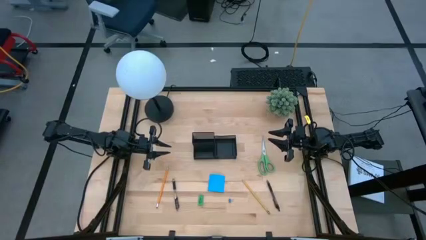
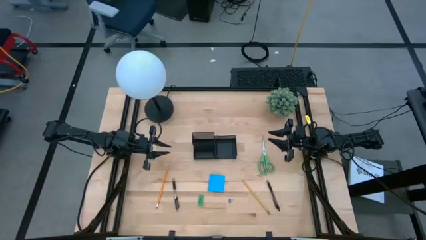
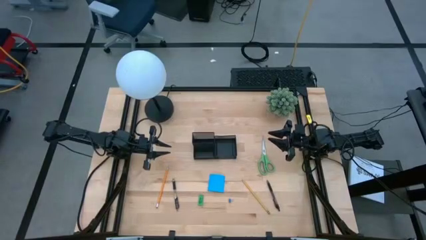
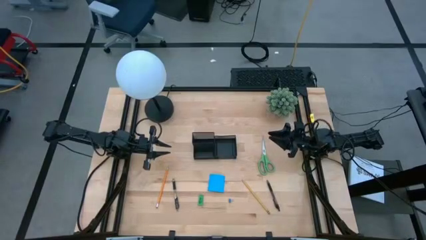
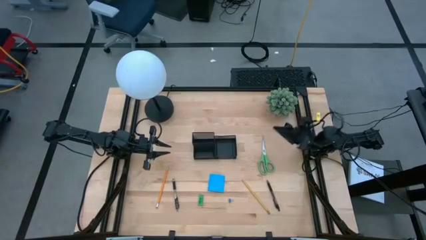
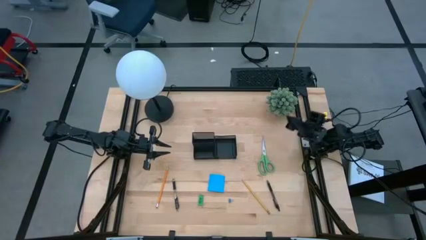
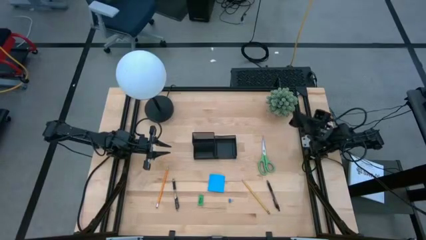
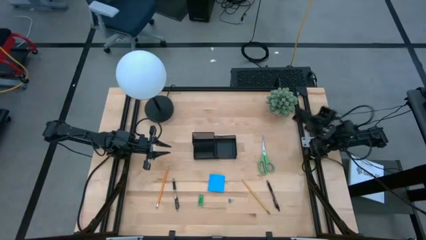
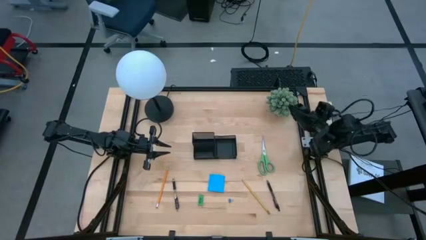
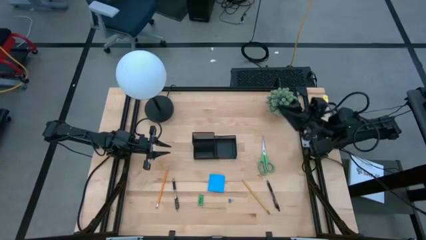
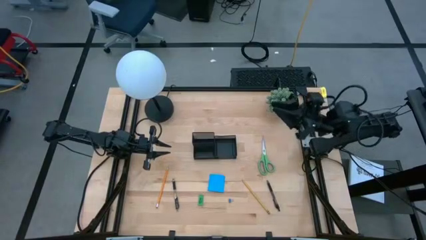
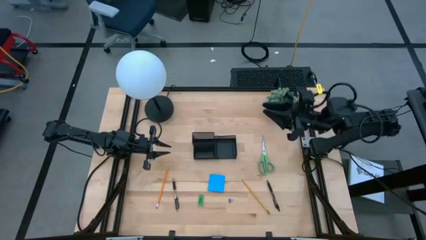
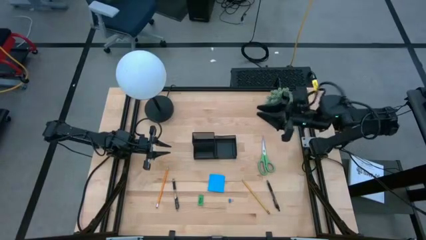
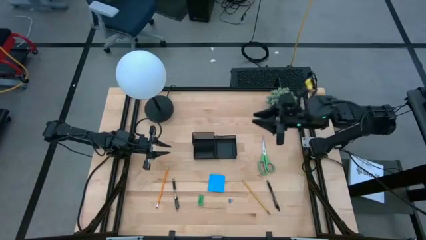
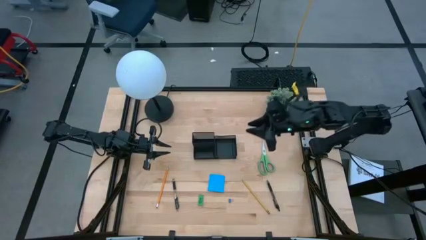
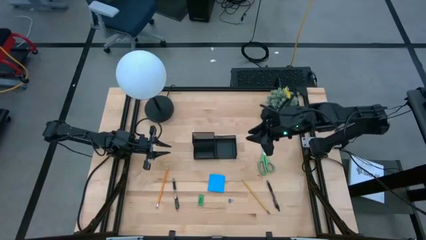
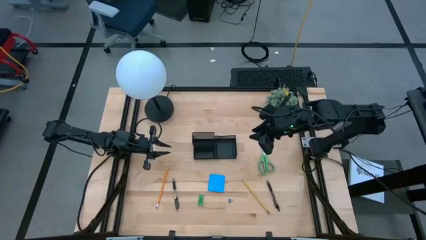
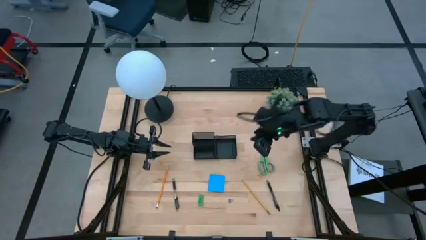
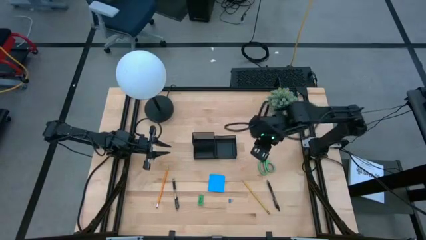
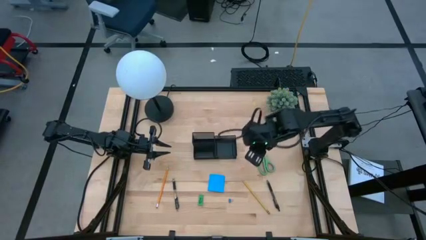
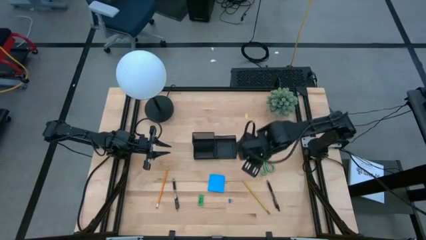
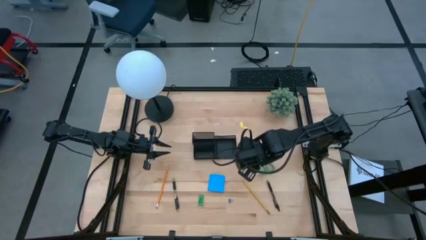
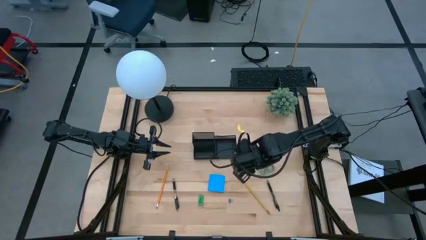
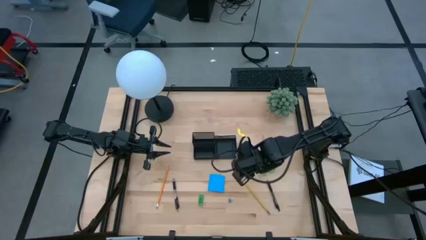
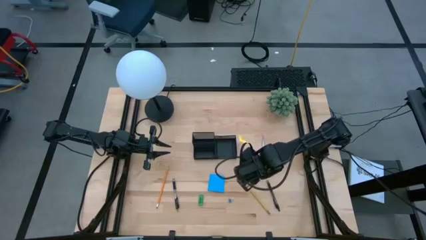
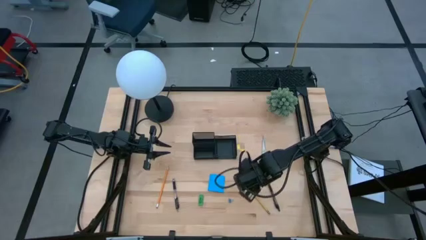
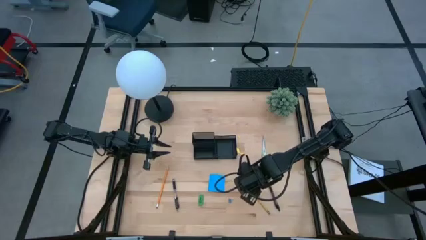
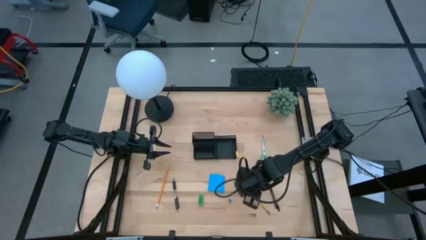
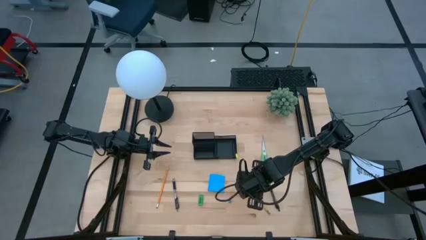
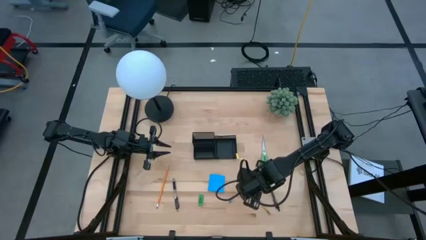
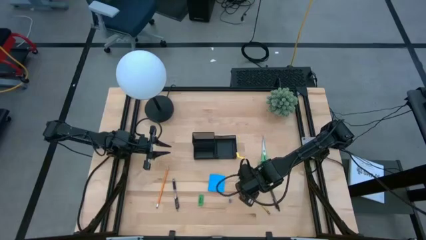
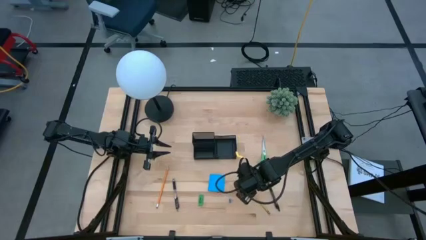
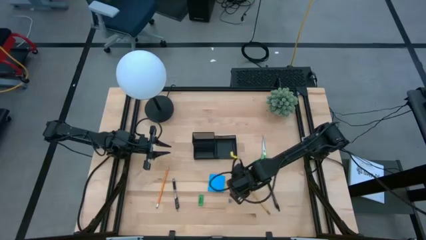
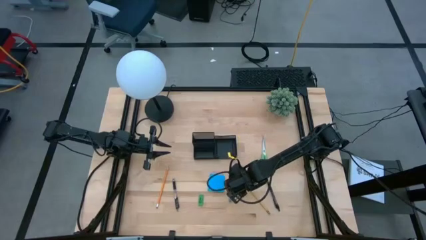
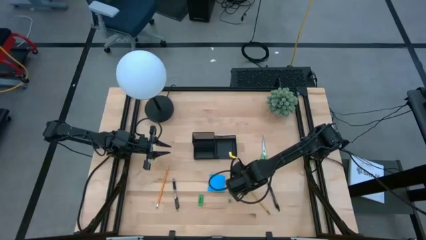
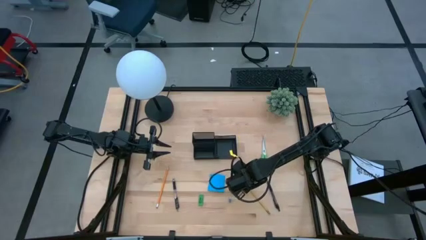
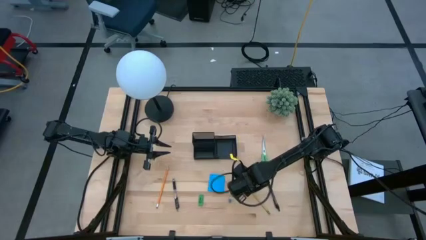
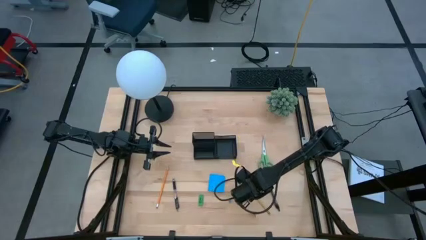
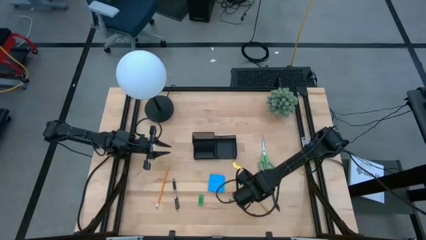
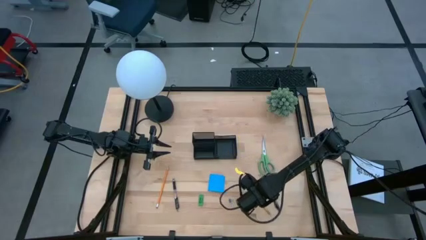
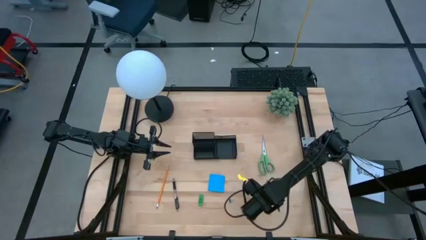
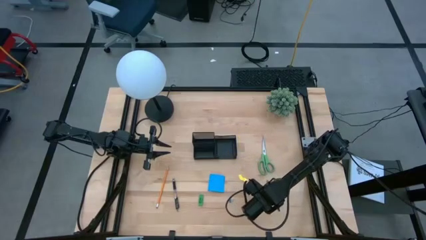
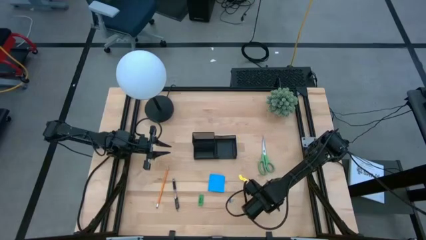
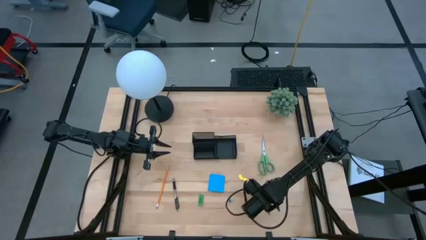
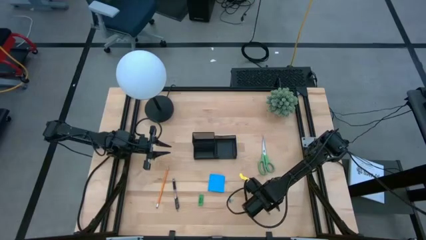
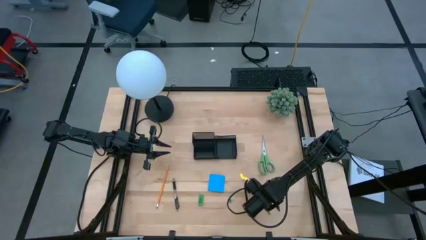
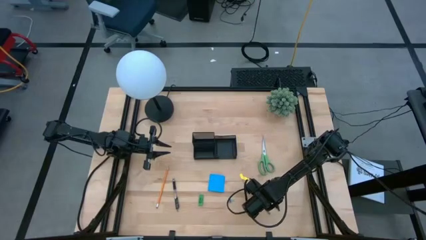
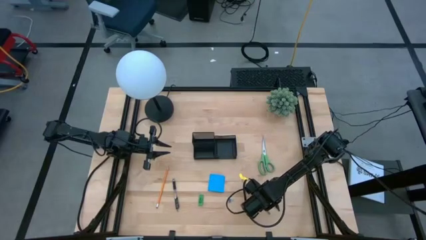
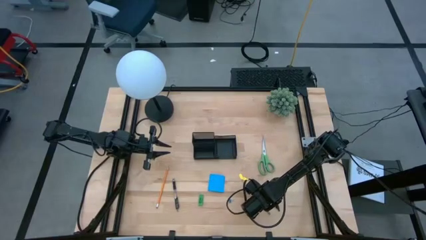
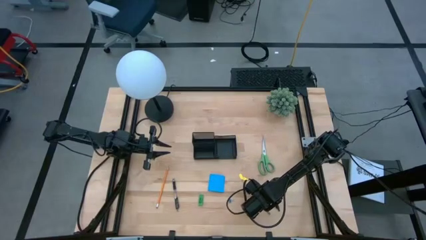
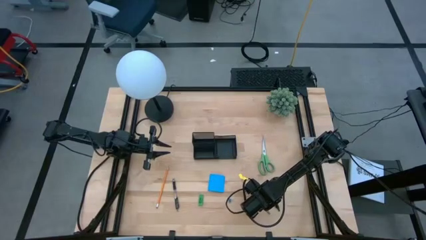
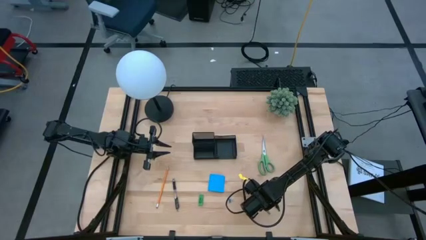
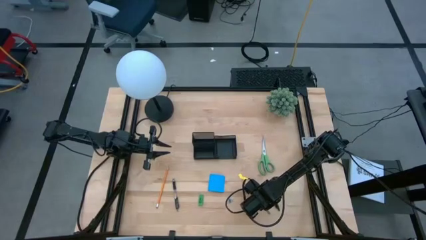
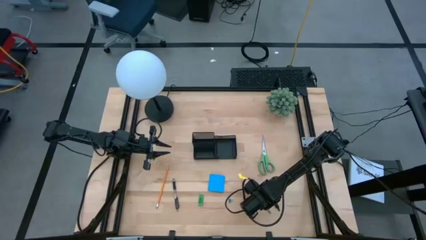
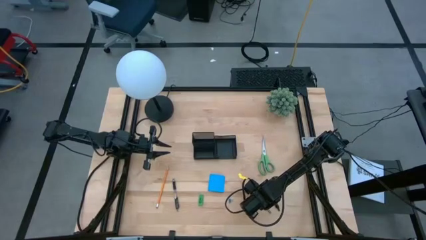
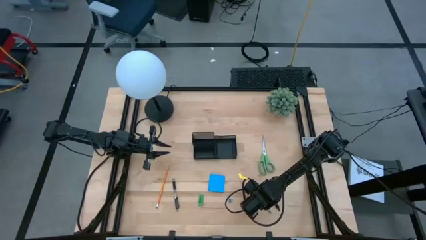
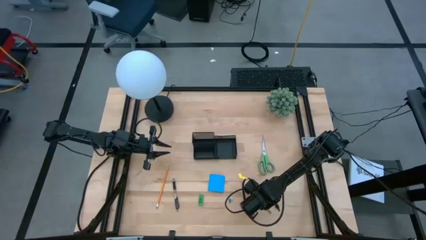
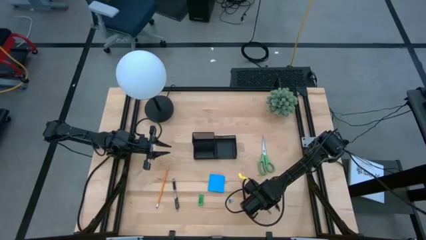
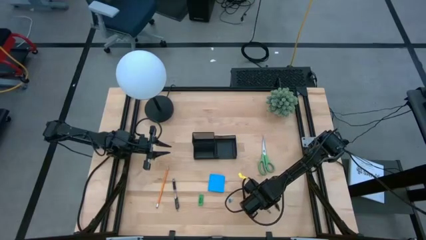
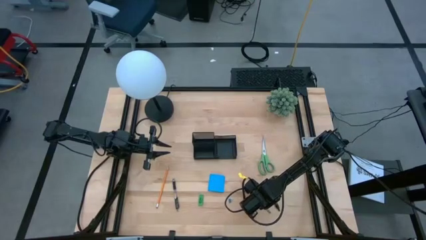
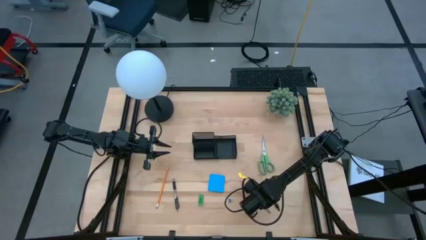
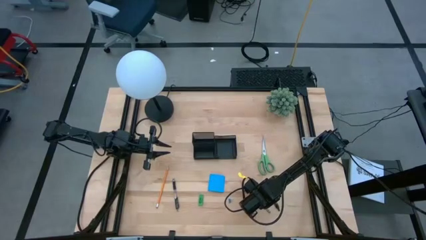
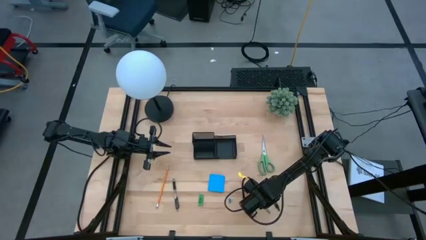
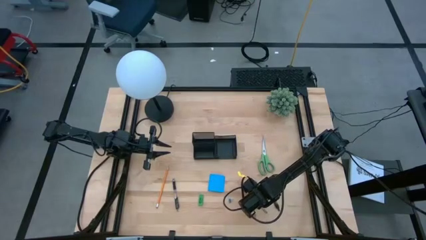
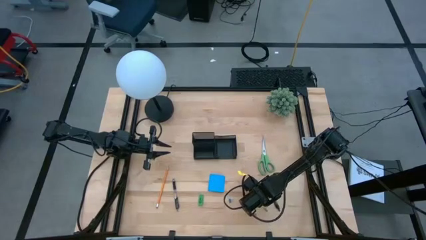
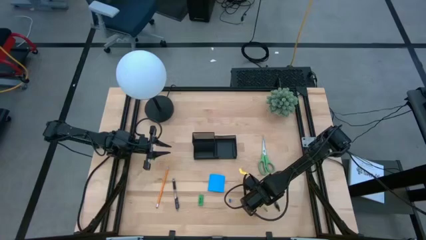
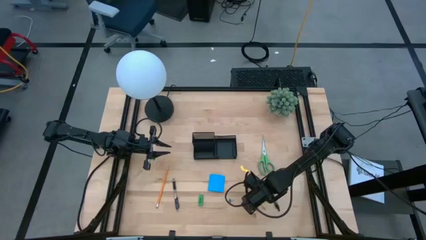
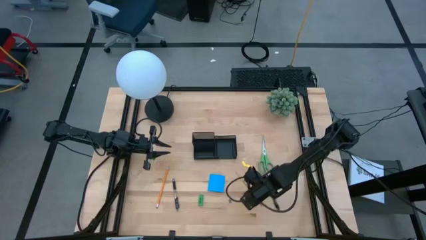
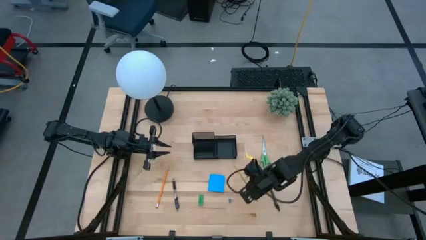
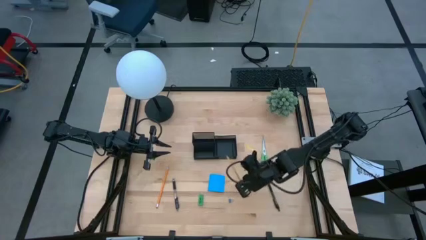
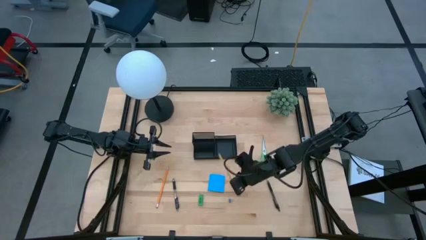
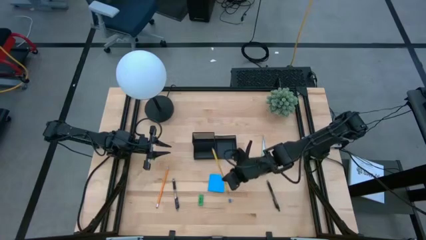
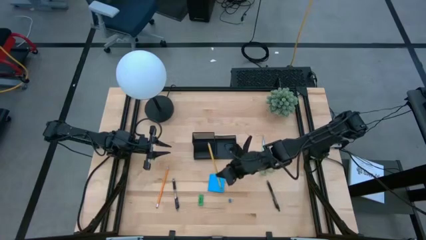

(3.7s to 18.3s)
Task: Pick and place office supplies into organizer
Put the yellow pencil into the black desk organizer
